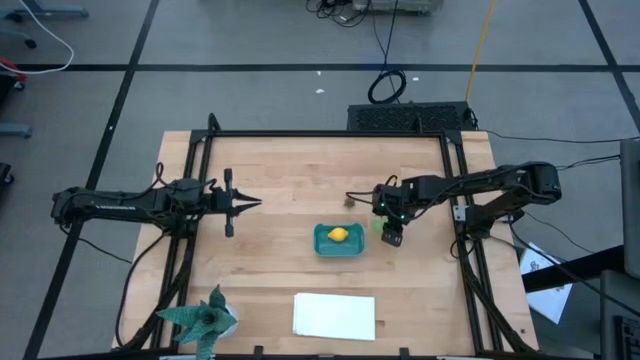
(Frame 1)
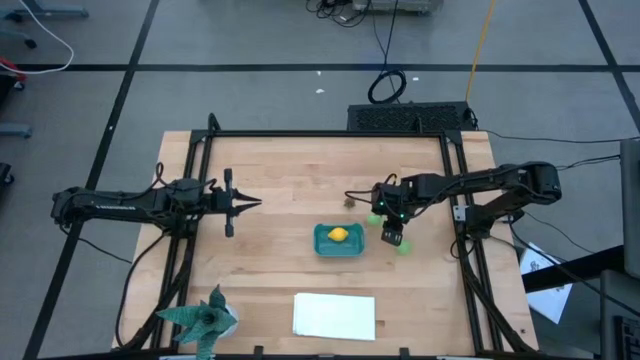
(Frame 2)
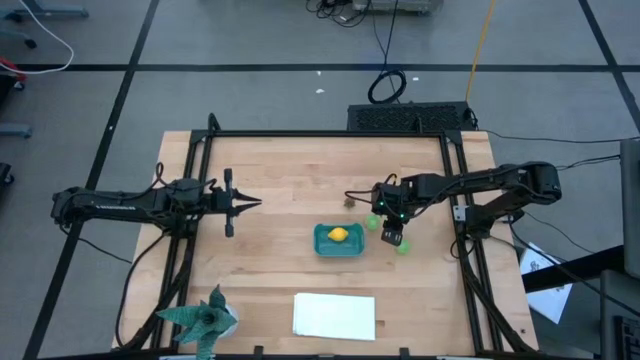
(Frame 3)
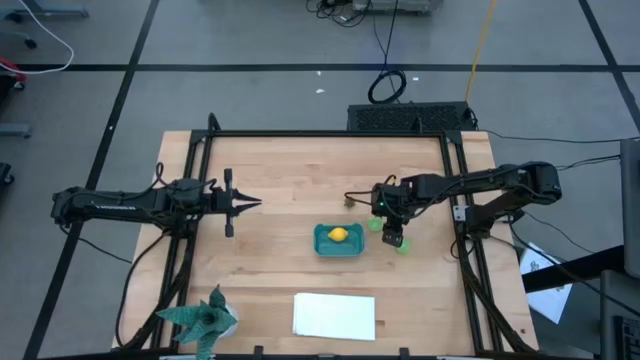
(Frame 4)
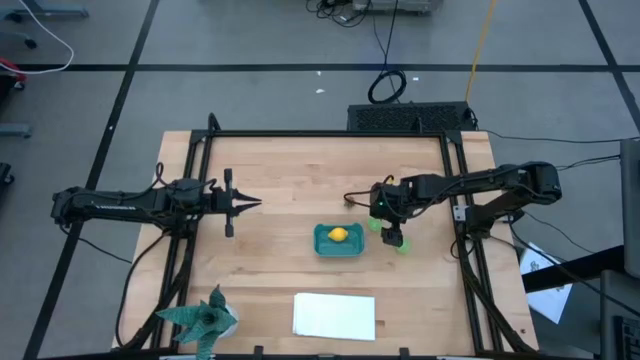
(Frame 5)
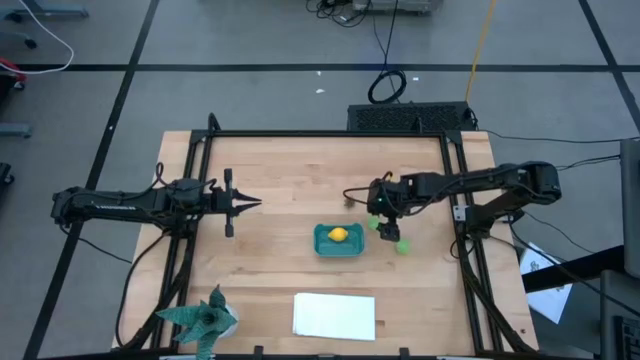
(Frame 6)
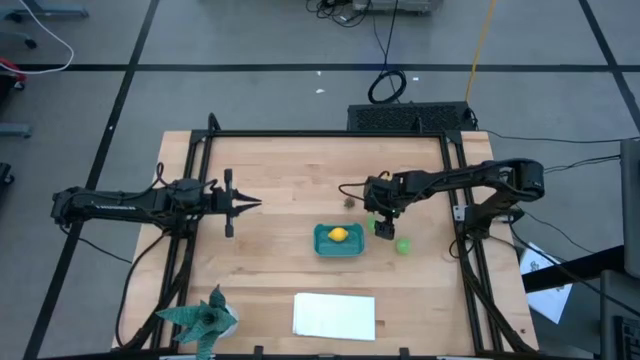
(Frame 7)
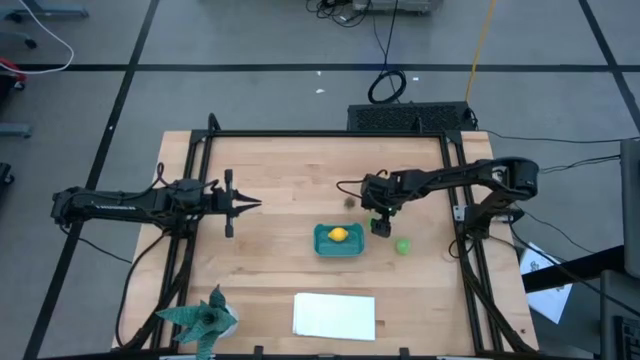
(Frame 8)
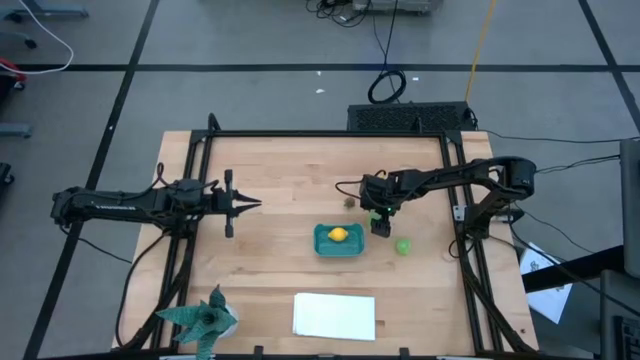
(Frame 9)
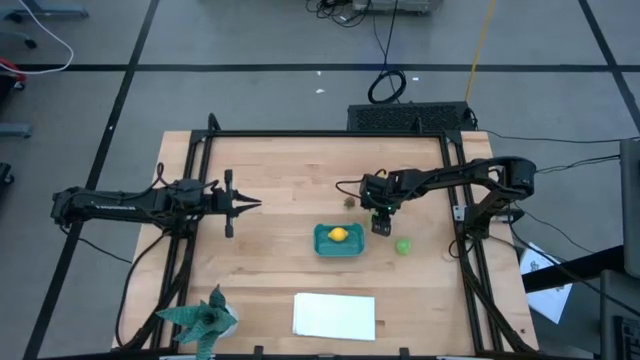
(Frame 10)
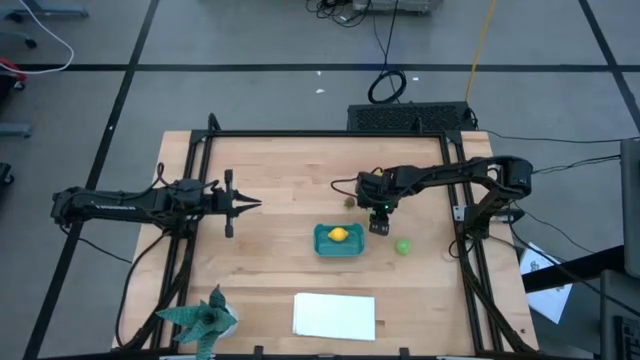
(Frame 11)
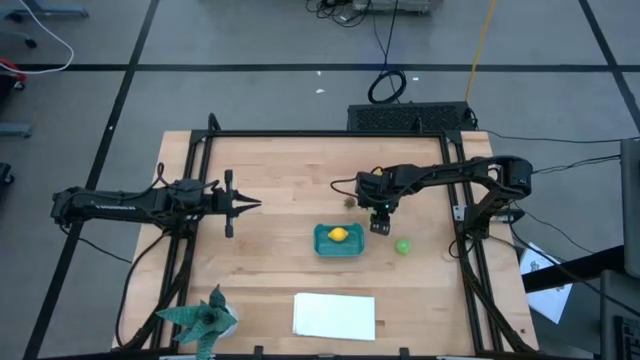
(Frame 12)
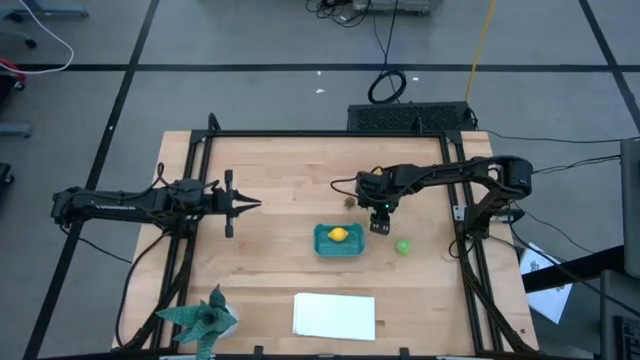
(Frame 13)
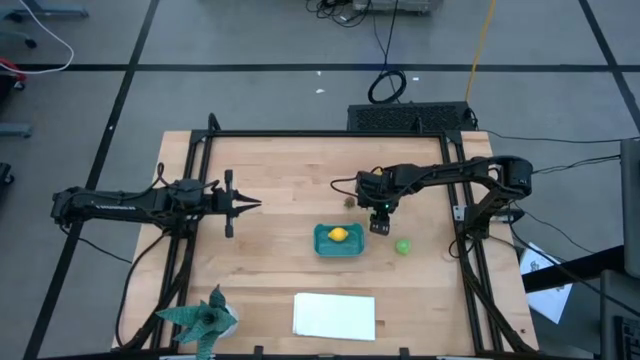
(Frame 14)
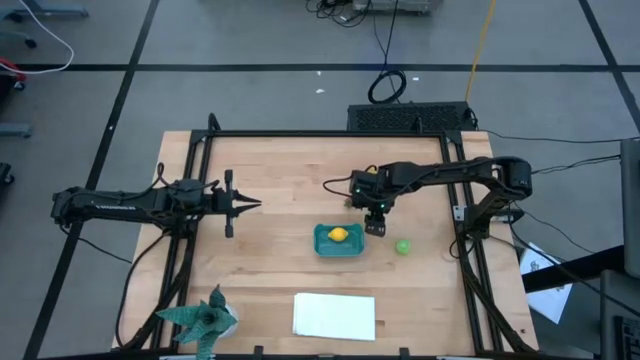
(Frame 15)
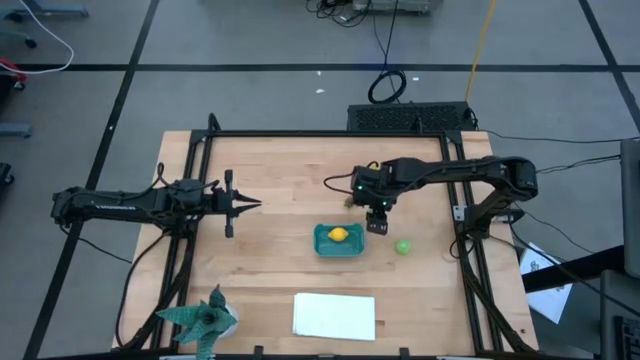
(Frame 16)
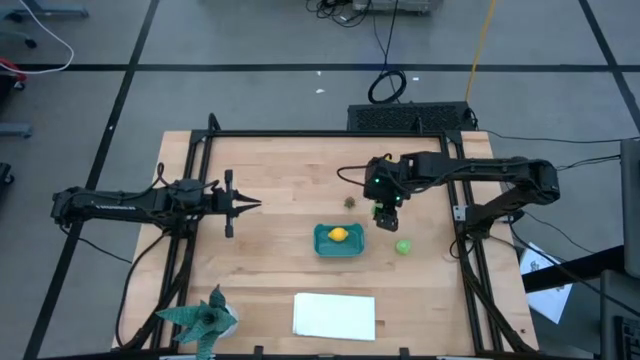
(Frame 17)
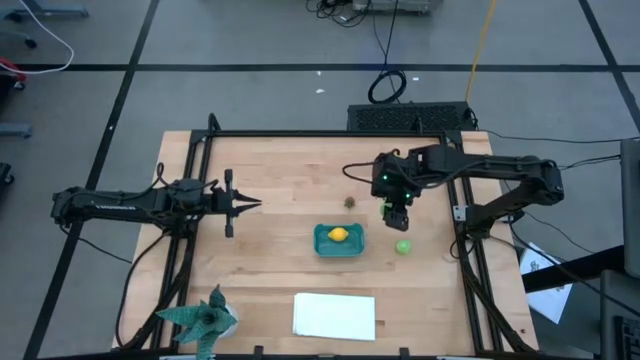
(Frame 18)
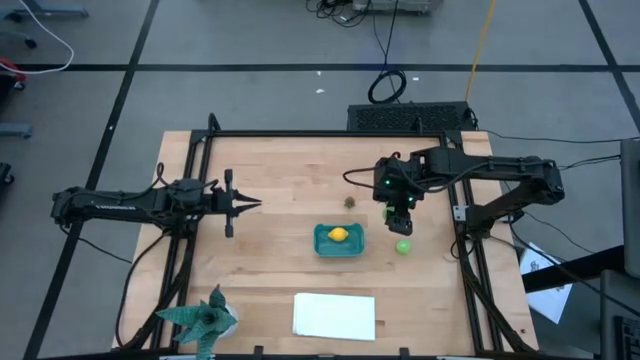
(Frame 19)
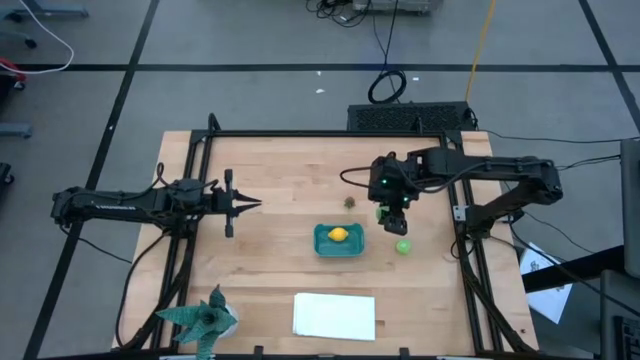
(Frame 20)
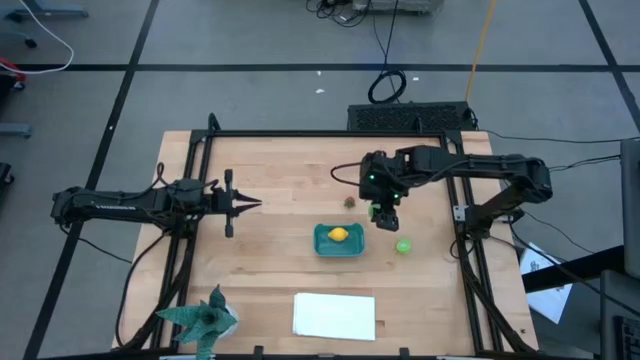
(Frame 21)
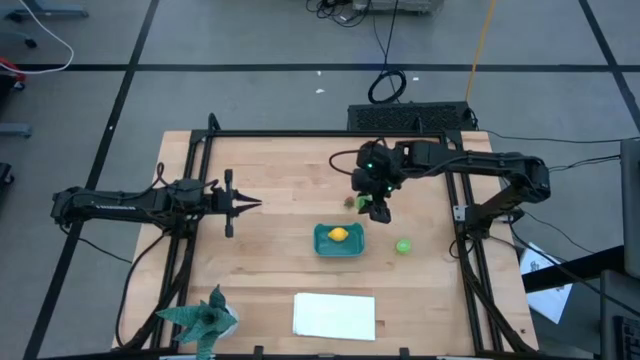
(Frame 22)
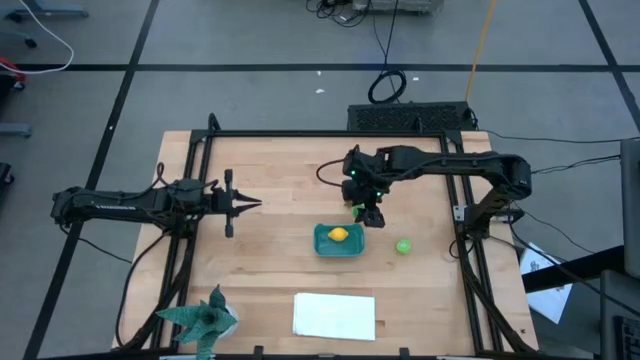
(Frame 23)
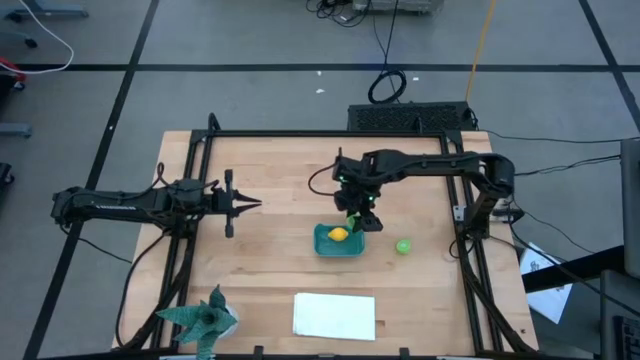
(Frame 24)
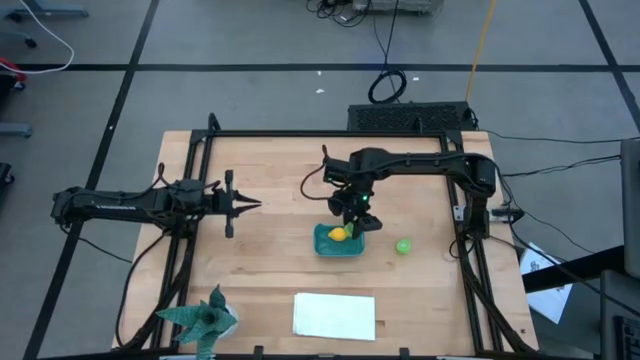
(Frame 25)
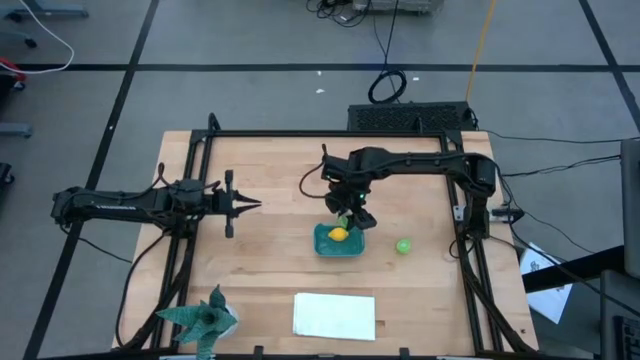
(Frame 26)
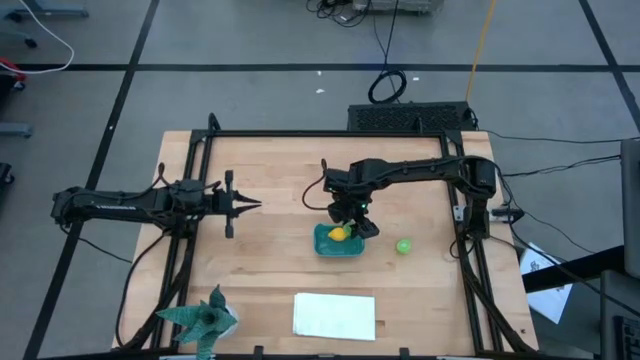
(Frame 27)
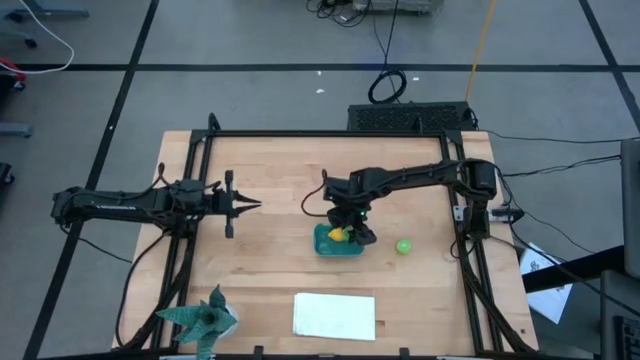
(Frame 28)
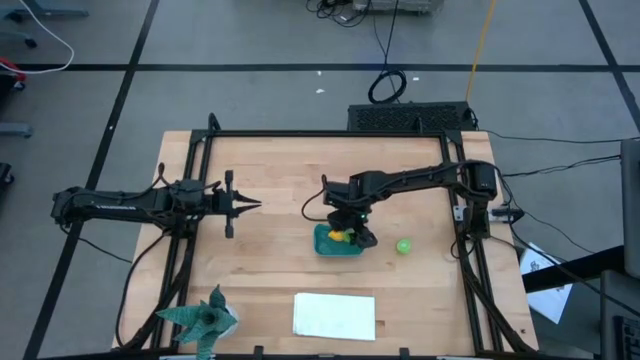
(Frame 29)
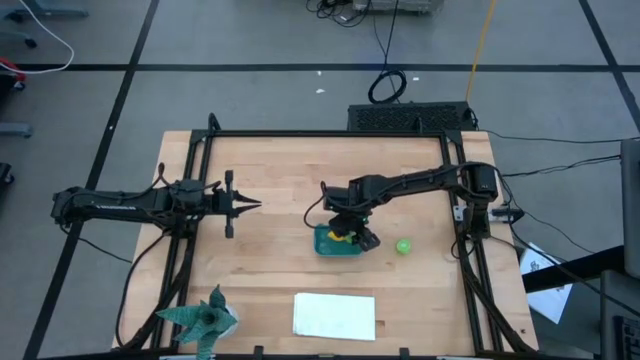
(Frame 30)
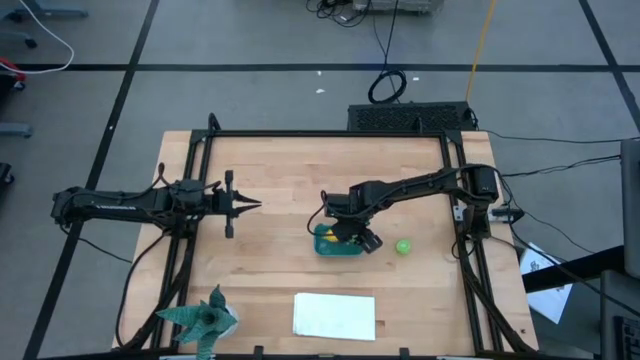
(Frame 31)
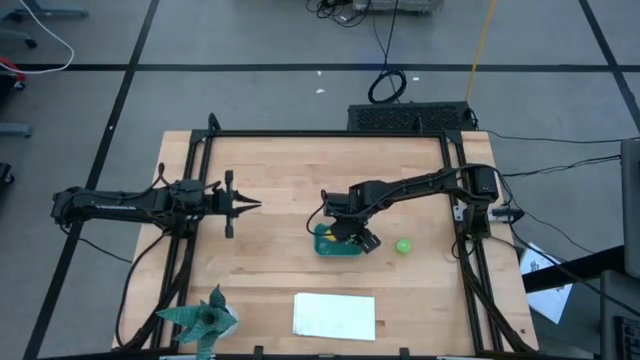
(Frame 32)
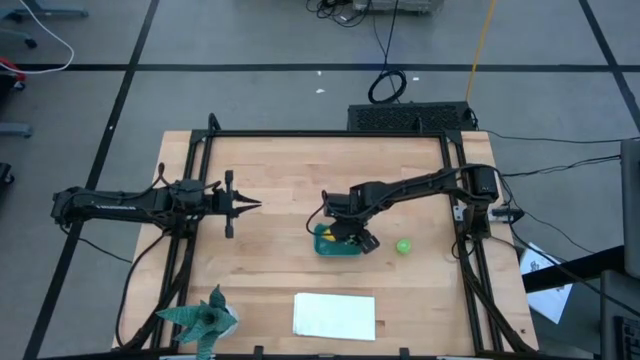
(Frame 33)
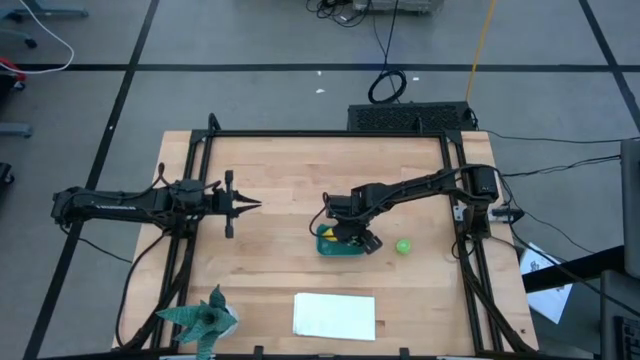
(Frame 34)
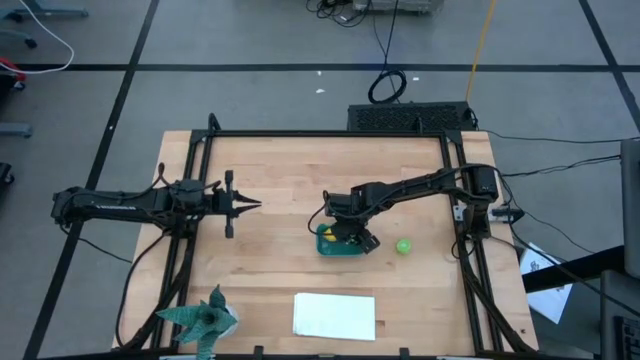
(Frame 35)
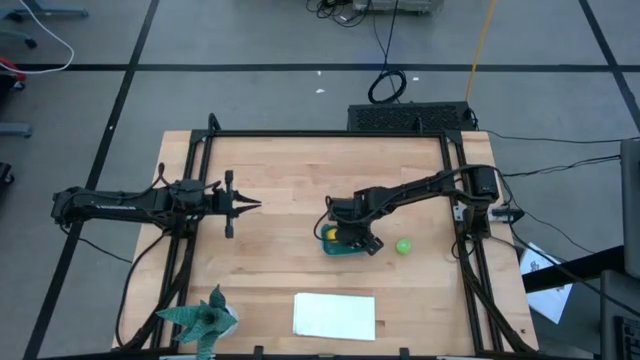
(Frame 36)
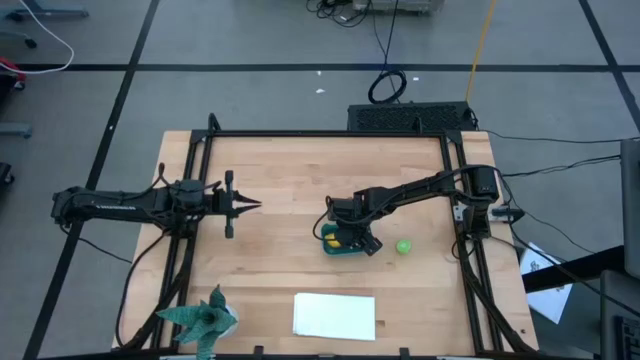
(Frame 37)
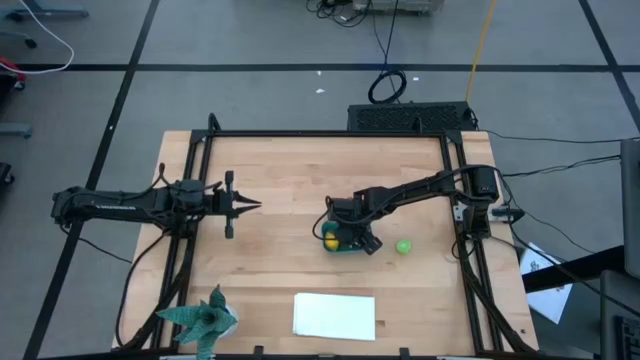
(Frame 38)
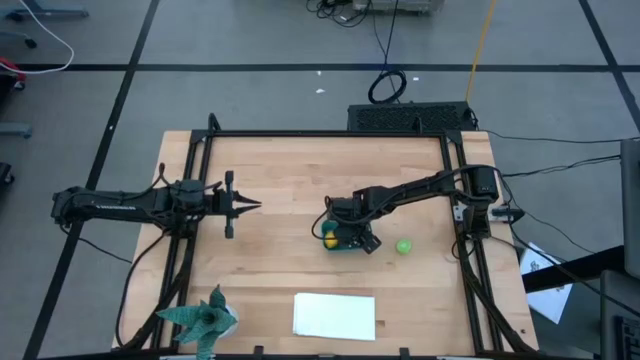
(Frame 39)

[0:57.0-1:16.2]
Task: Pick and placing Produce into tupperware
Put the top sliced green cabbage into the green bin
